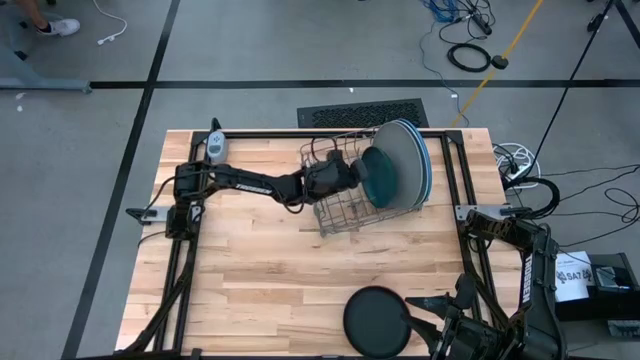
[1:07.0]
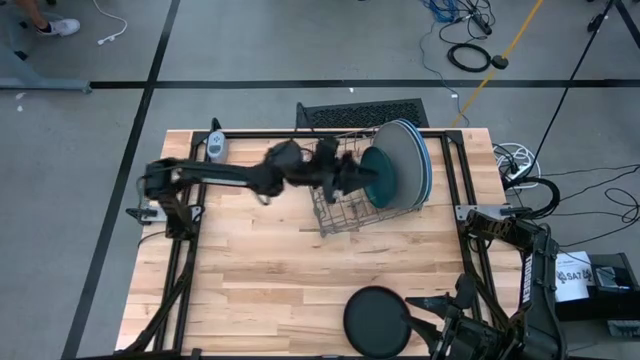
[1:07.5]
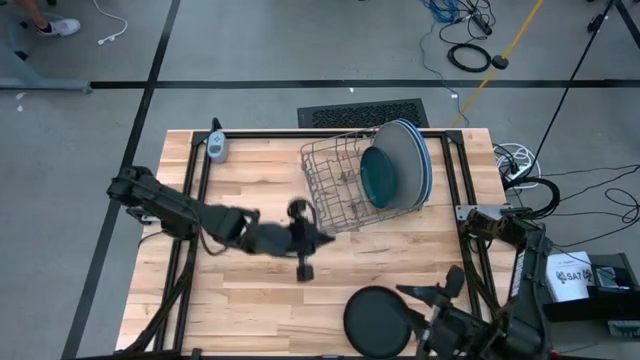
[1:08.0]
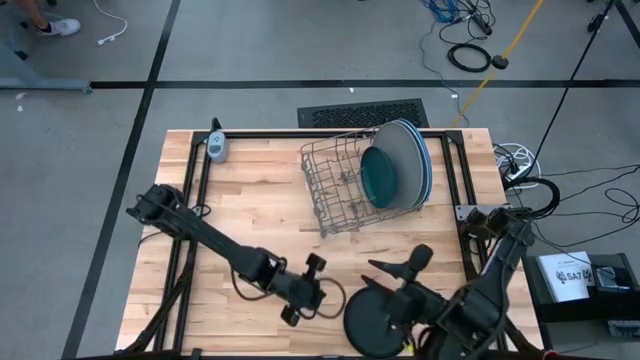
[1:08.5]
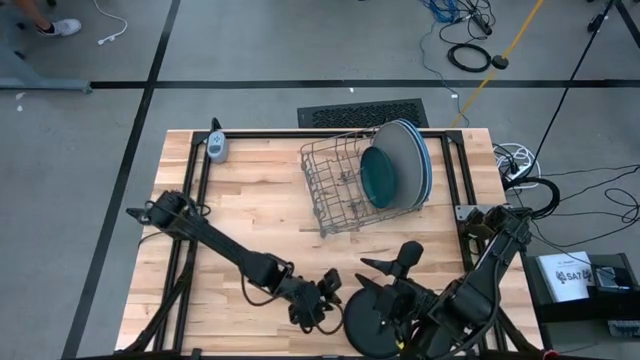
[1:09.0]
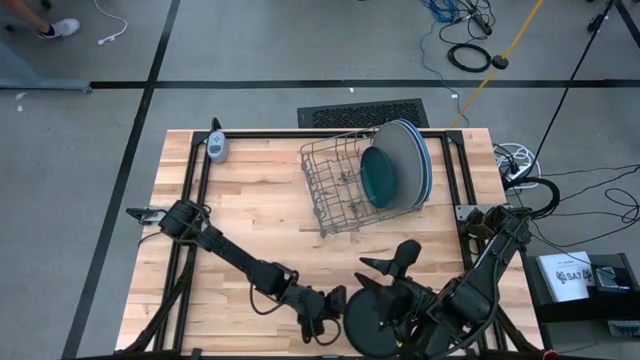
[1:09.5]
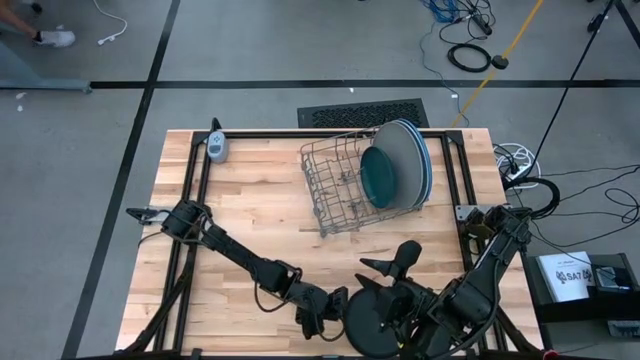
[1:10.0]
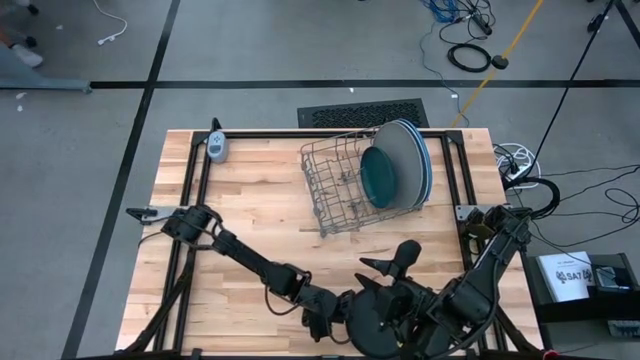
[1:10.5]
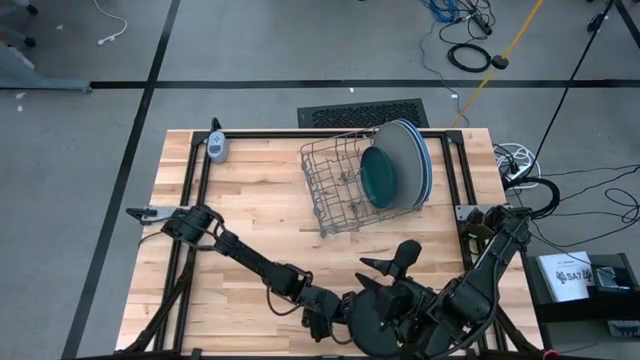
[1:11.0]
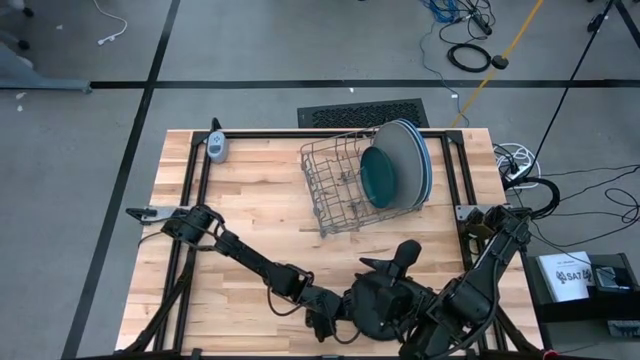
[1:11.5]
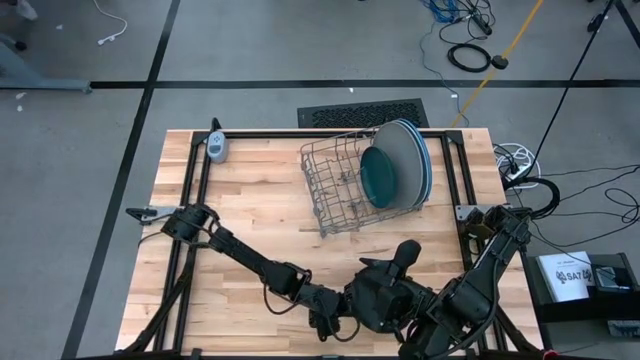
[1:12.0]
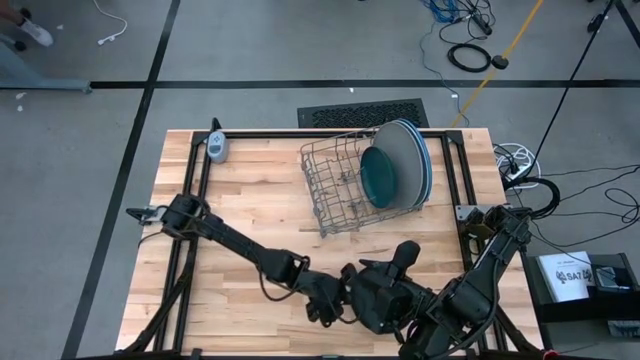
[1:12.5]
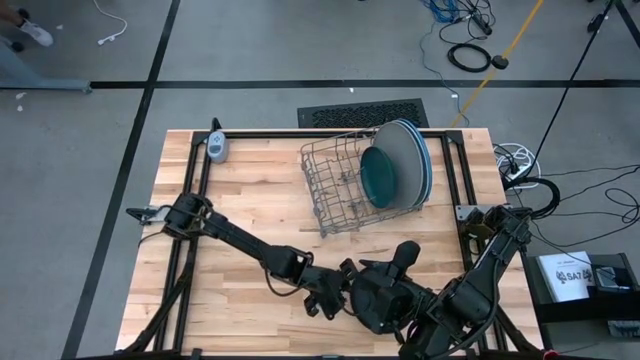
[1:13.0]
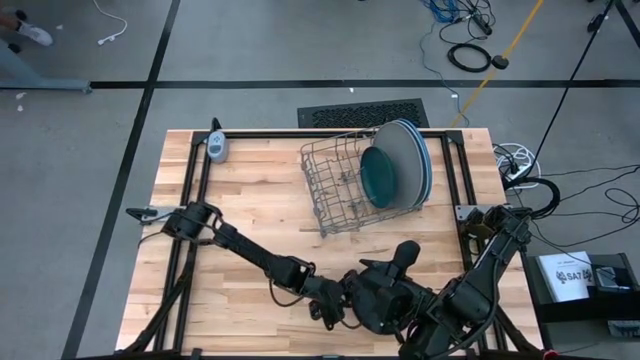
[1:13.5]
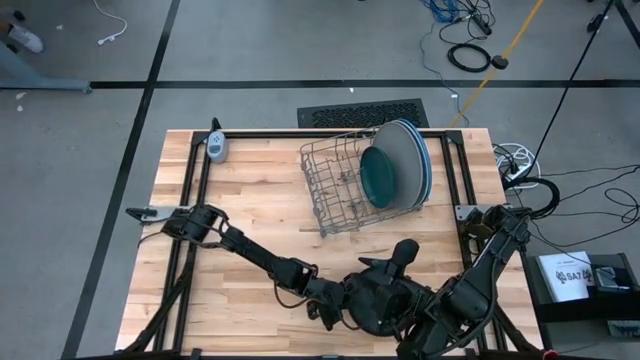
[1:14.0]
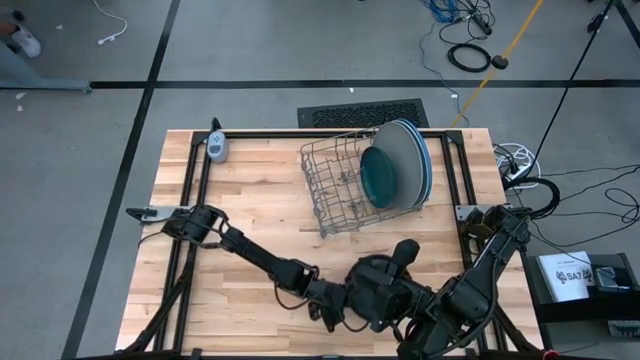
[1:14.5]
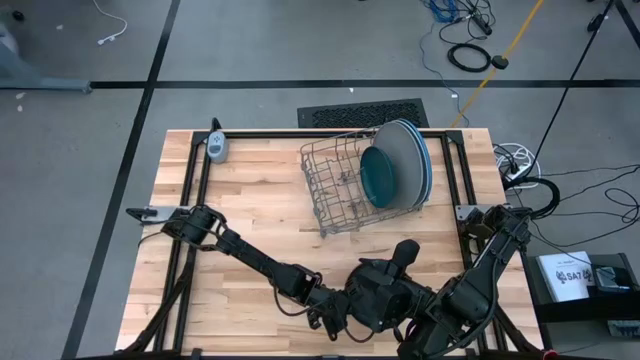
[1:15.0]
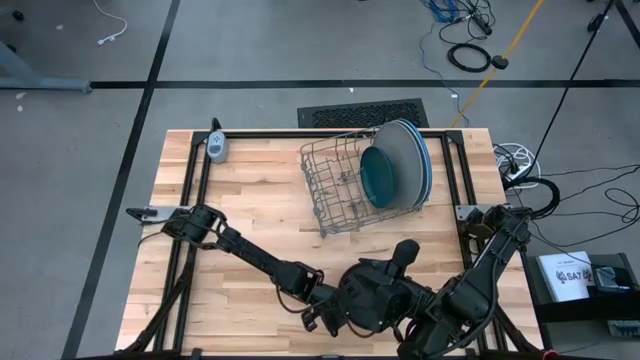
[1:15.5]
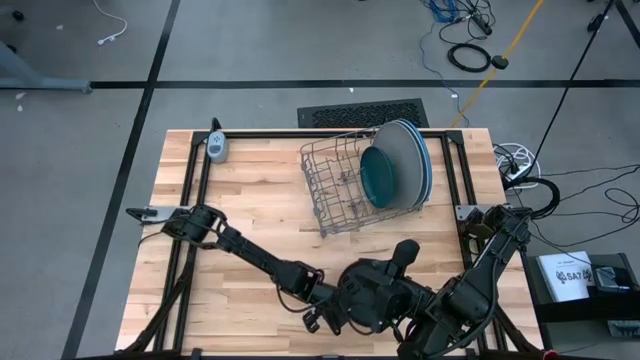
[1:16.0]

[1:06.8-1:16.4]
Task: Sort dishes
Put the black plate in the dish rack

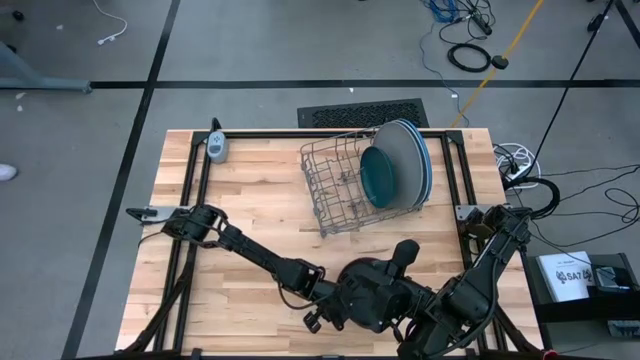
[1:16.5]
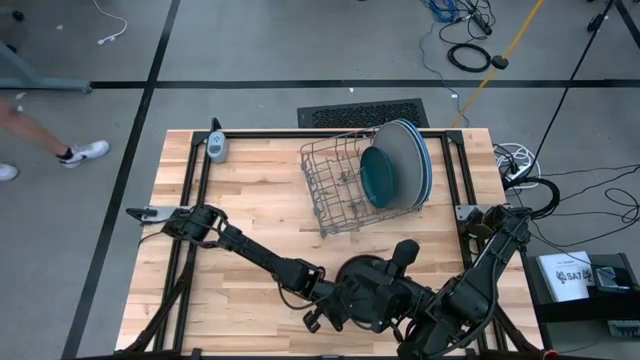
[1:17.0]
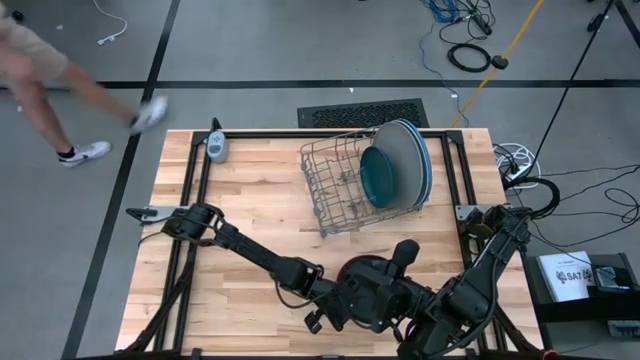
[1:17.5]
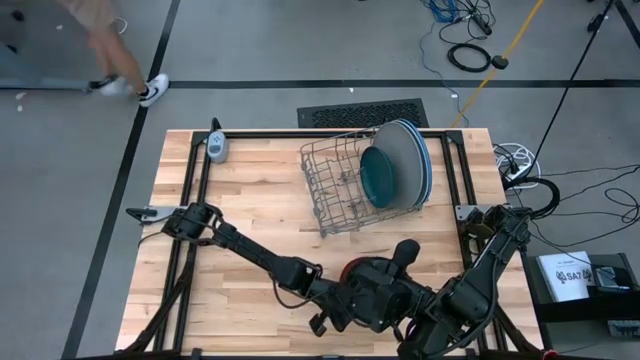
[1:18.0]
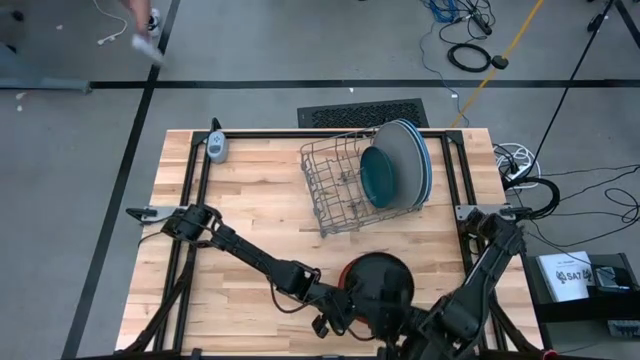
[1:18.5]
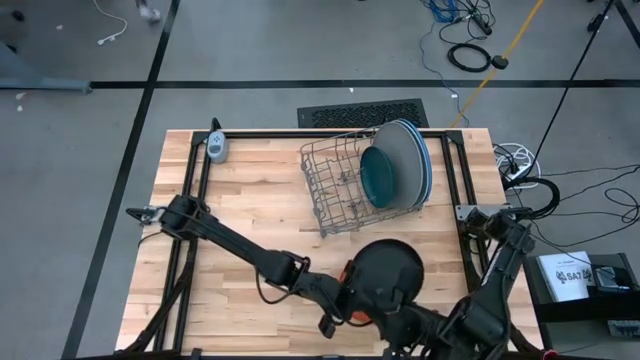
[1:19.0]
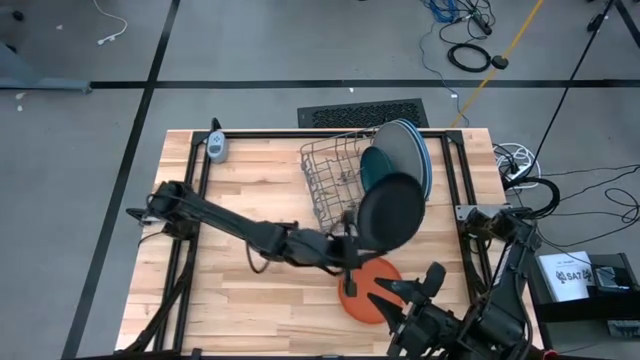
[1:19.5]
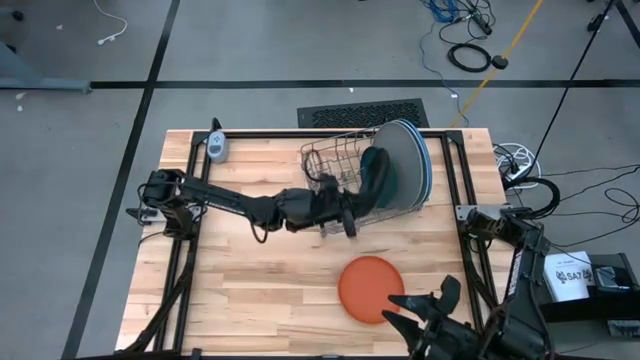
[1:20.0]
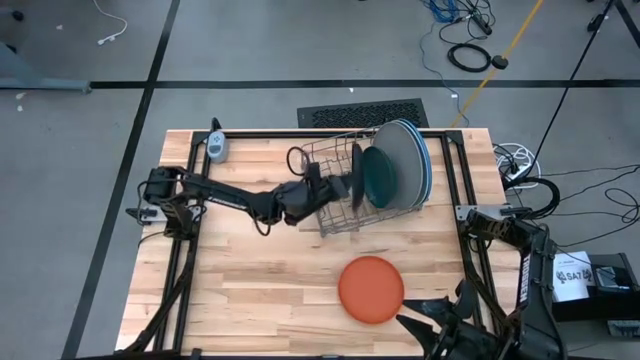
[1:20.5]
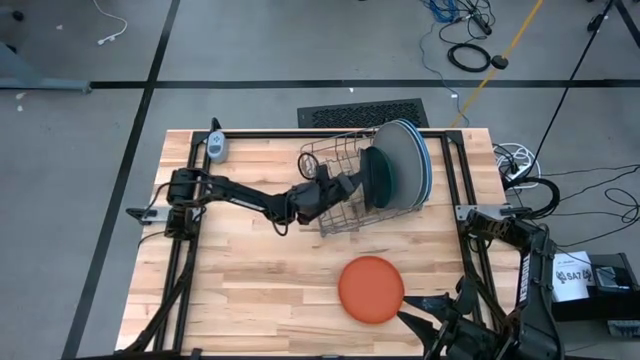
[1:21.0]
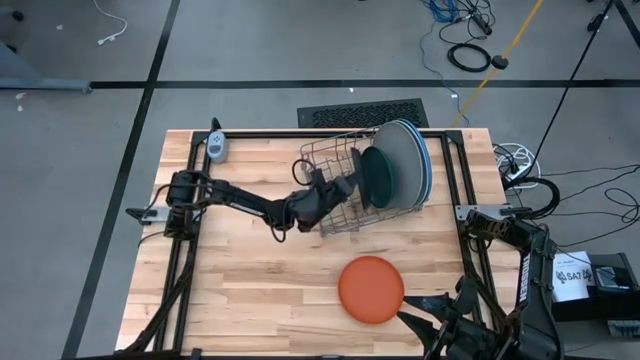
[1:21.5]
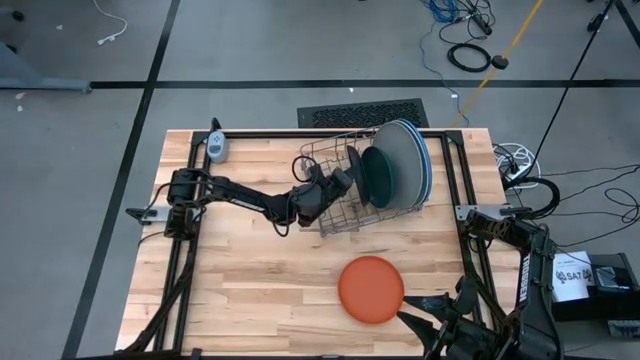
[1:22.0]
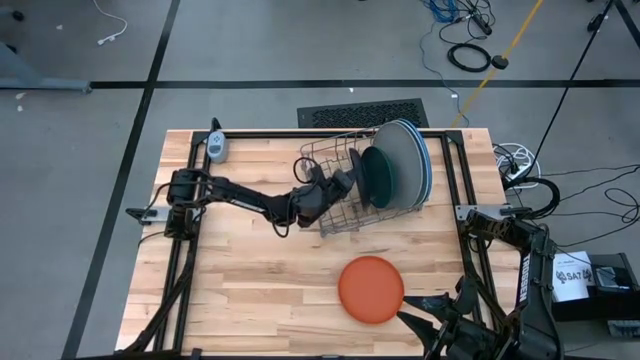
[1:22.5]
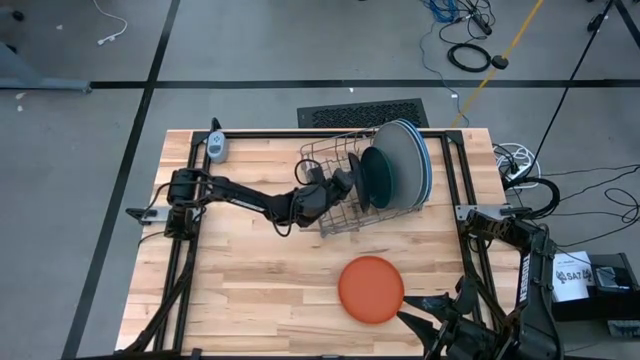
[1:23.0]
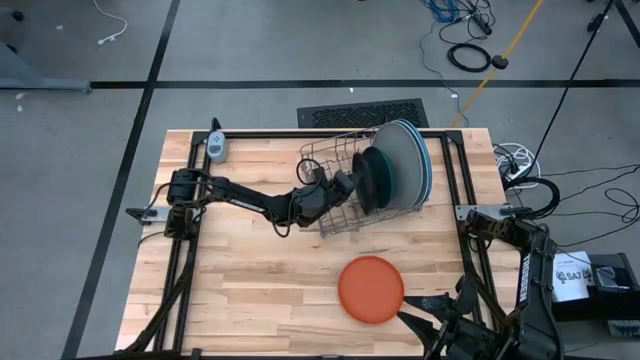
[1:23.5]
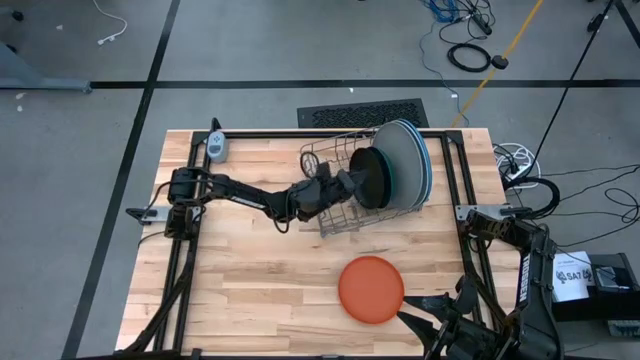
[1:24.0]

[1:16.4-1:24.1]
Put the black plate in the dish rack

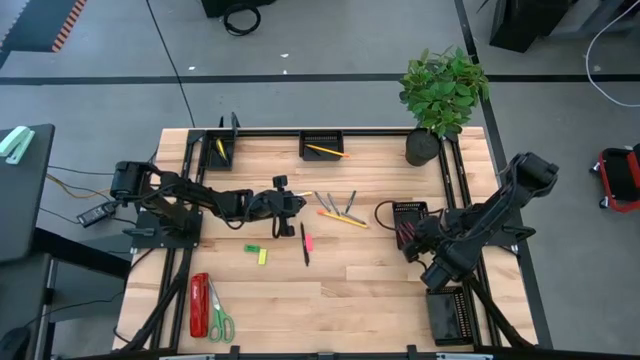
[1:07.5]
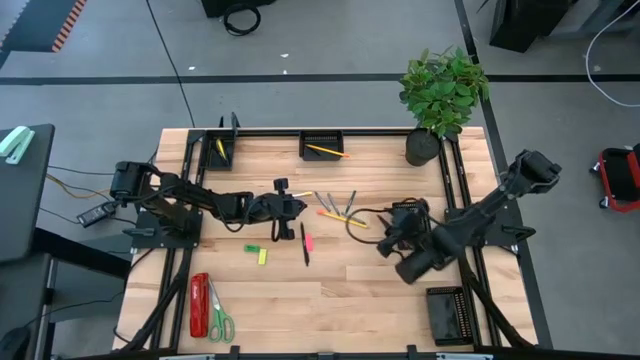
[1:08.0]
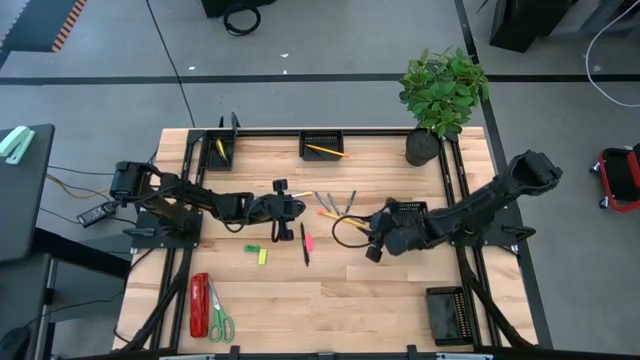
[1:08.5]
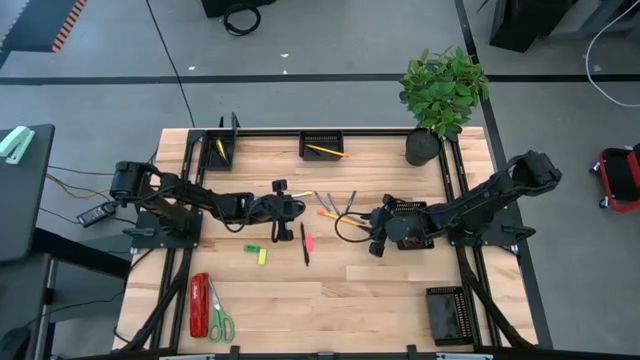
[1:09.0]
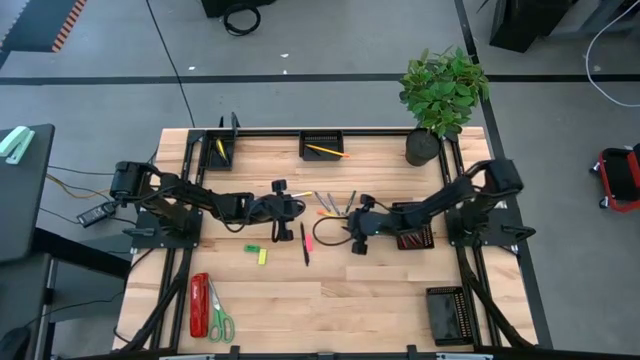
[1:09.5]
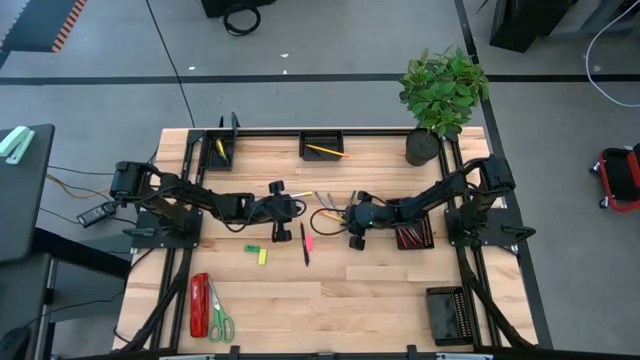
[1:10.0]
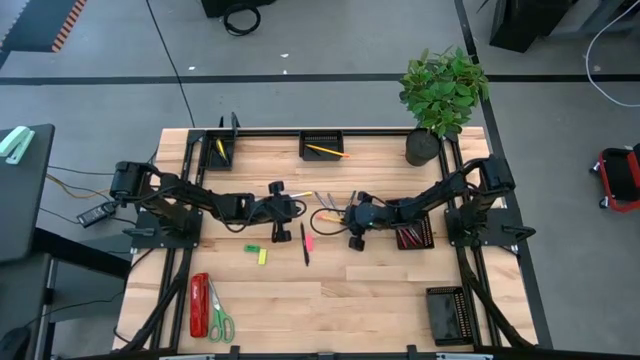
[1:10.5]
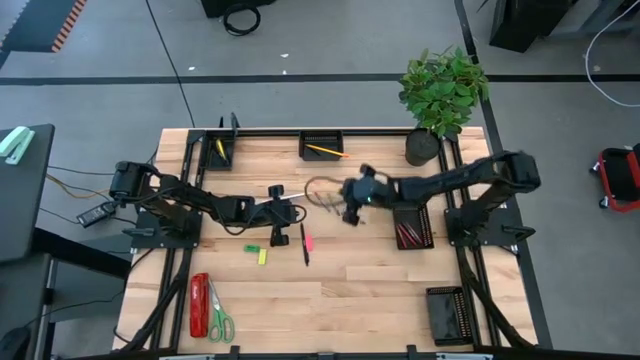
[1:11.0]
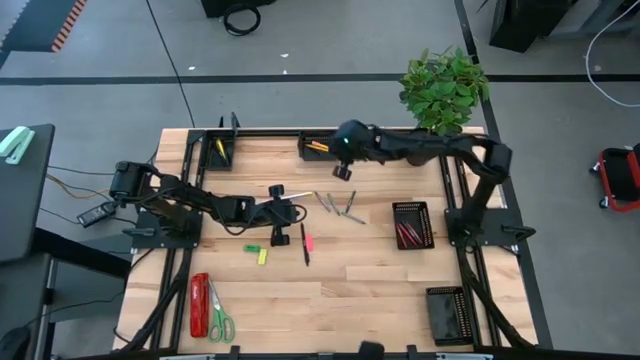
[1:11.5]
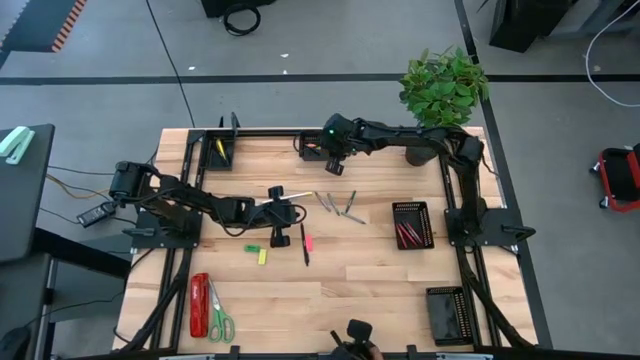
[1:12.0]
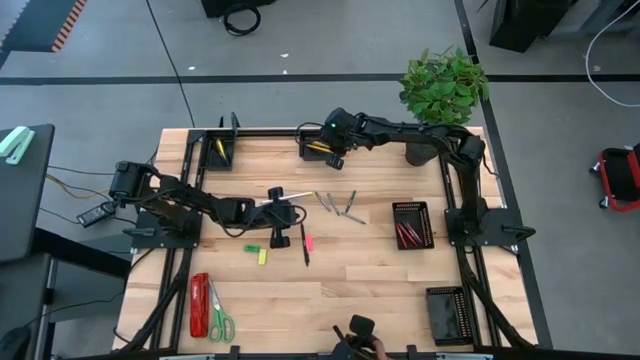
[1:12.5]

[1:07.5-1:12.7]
Task: Sort crayons/erasers/pens/pencils in bins
Put the yellow pencil into the top right black bin
